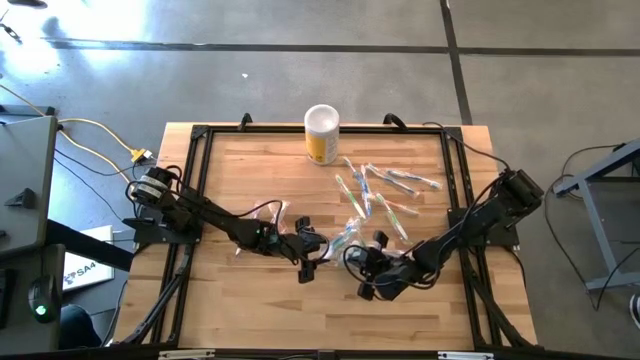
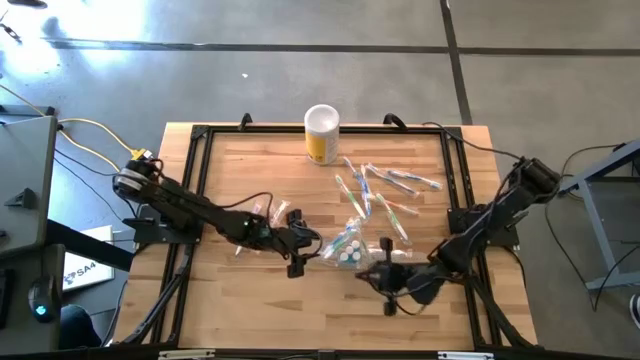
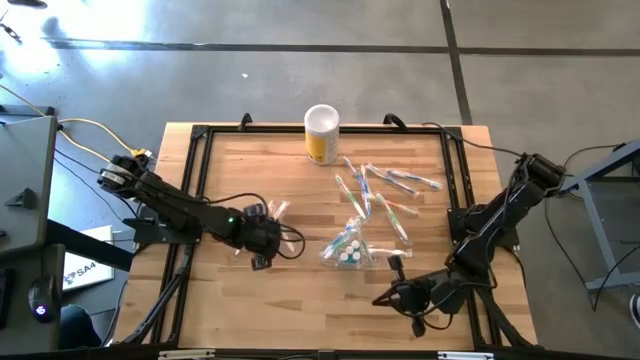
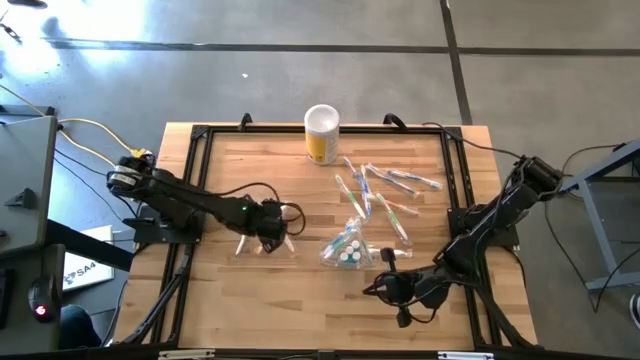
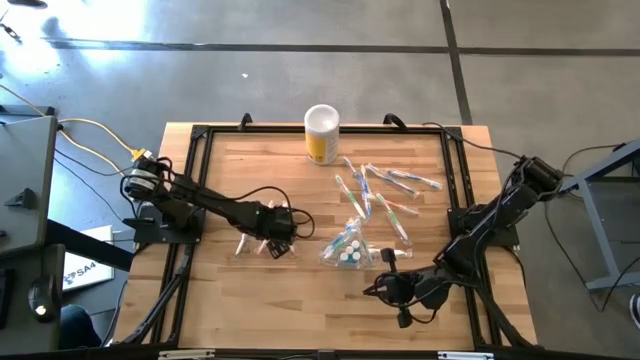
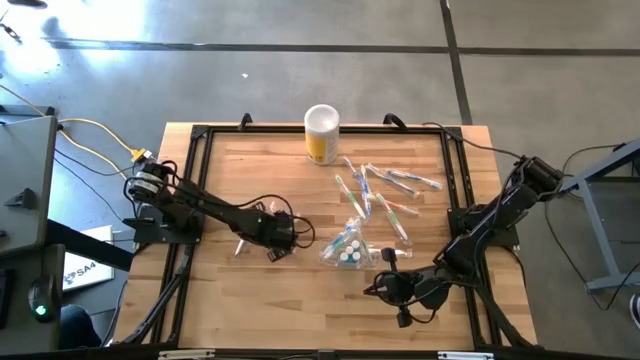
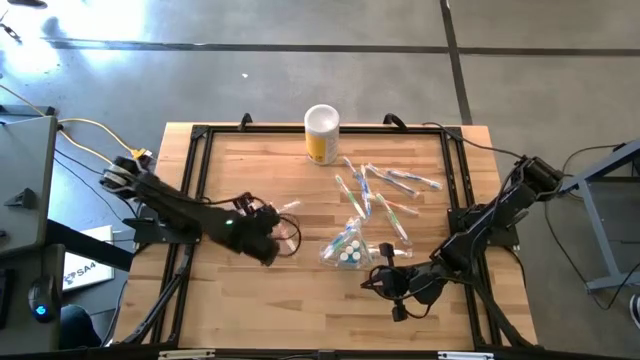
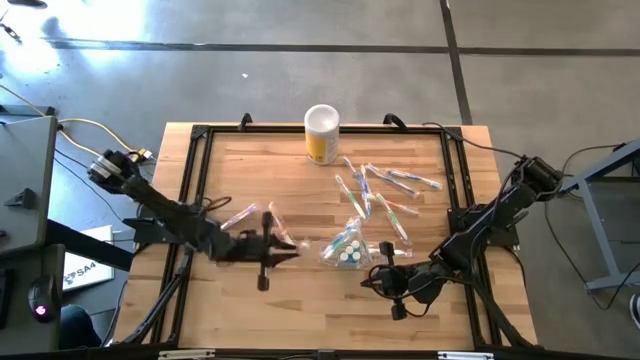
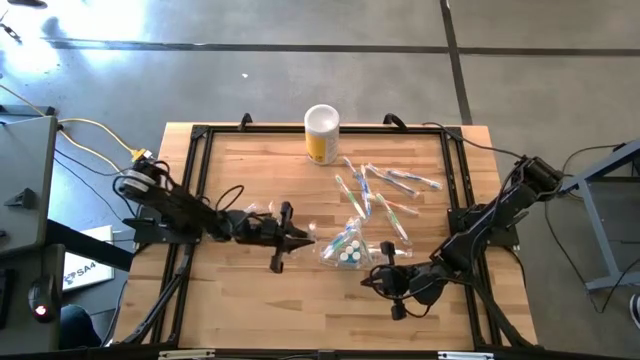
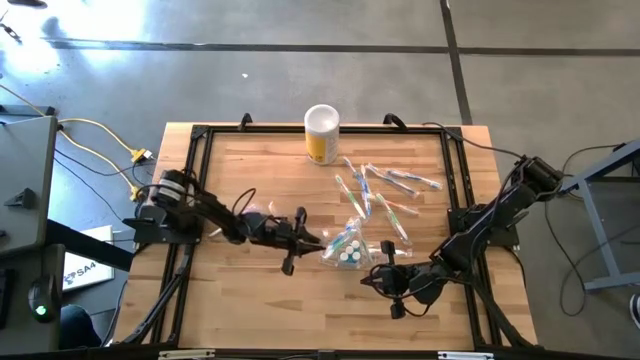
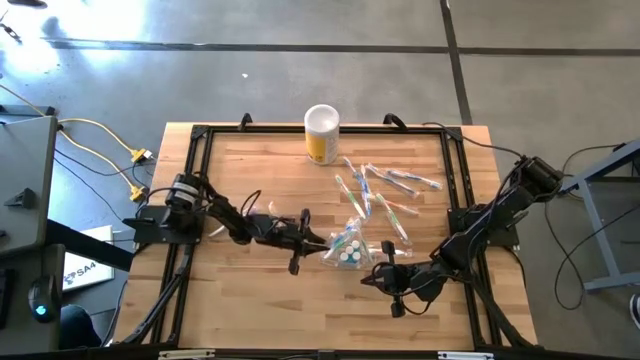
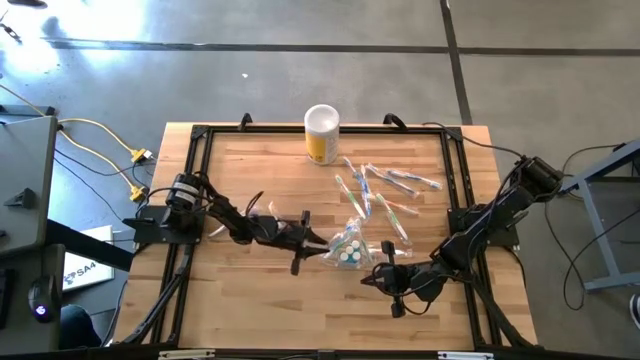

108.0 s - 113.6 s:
Task: Pick & Place toothbrushing station
Put the orange toothbrush in the transparent organizer

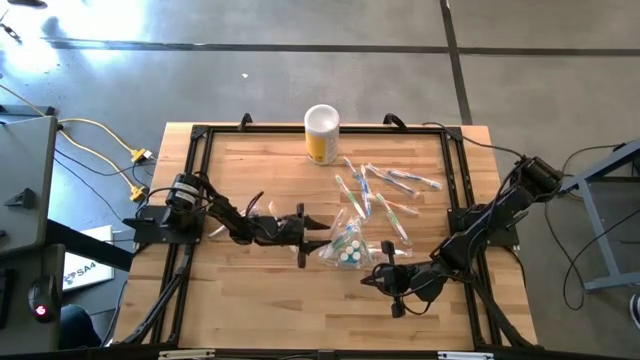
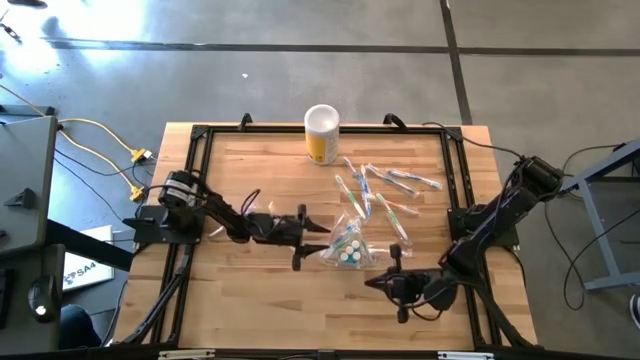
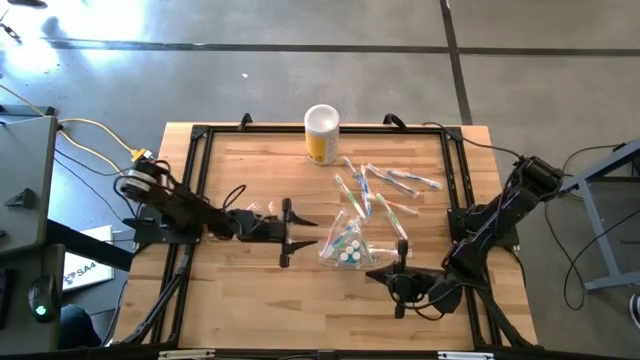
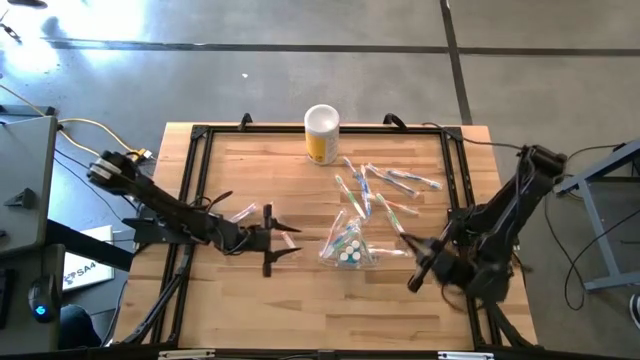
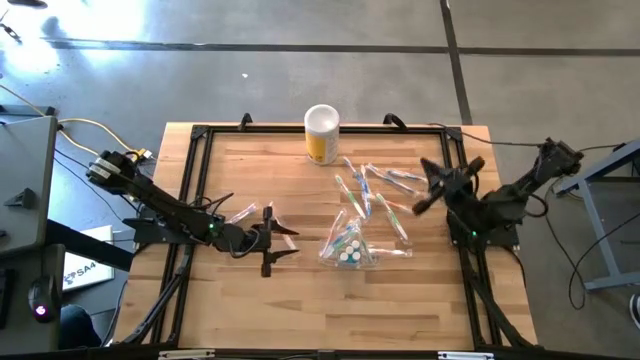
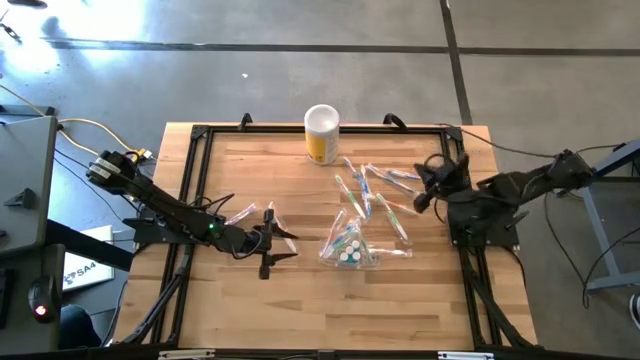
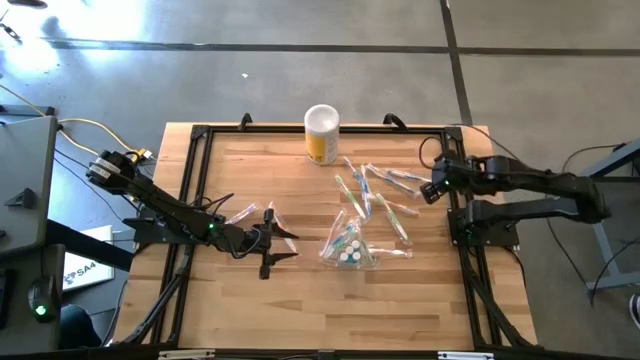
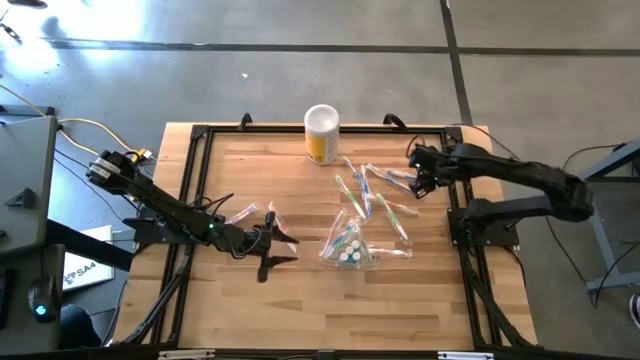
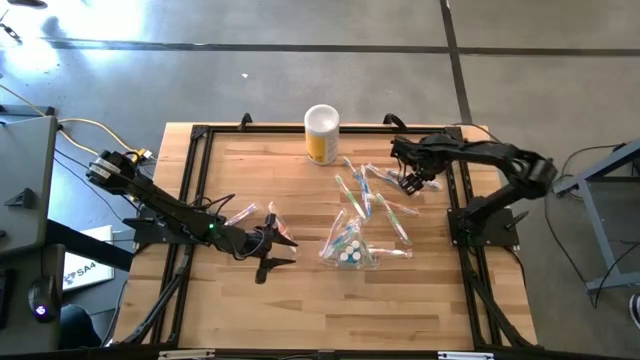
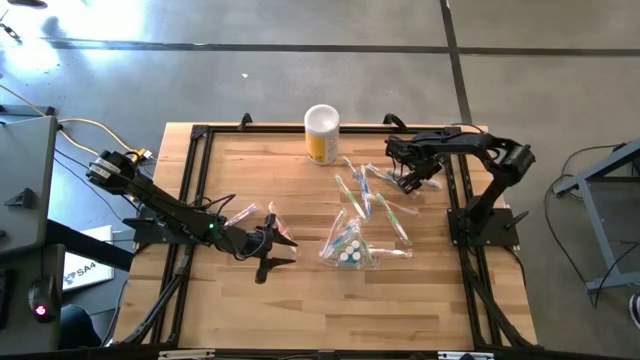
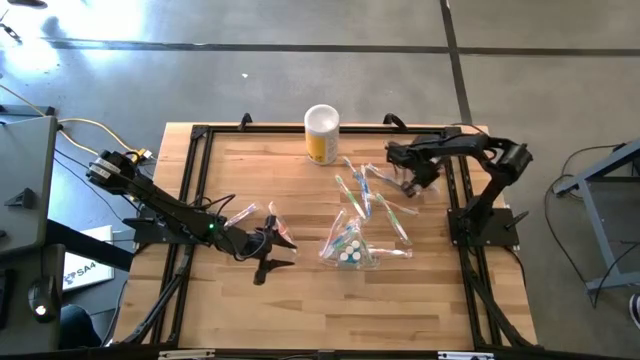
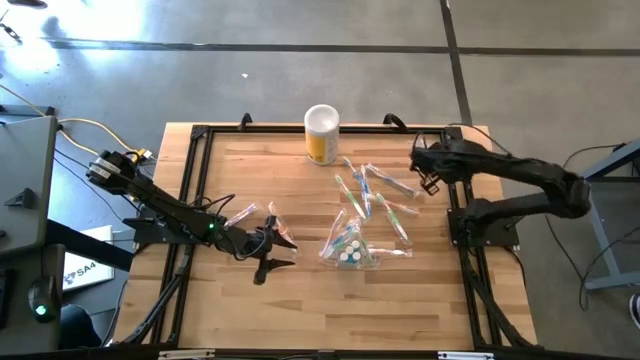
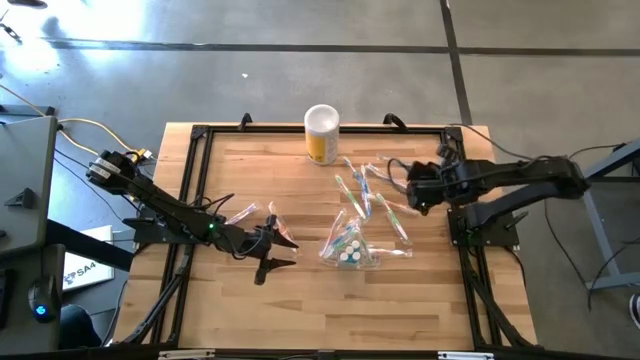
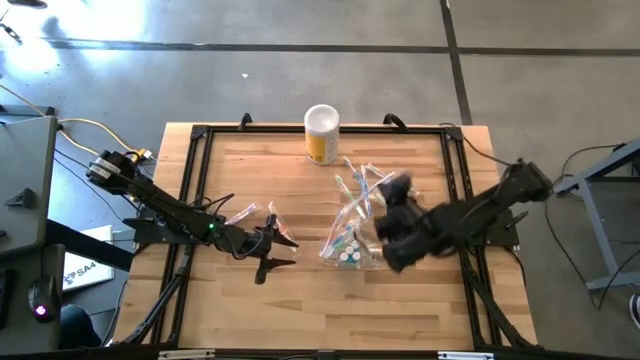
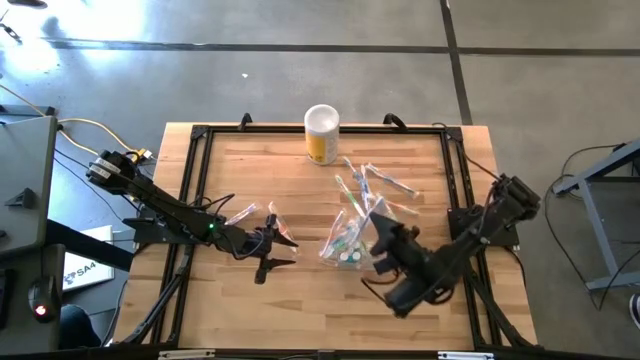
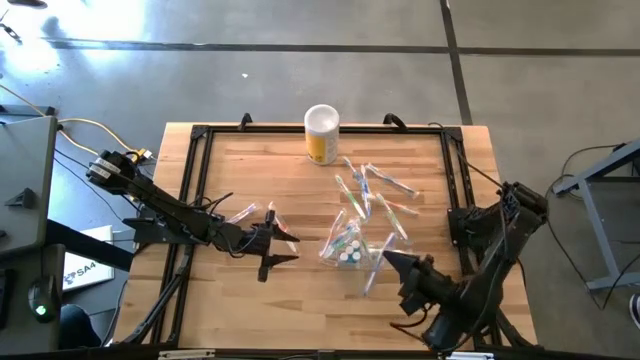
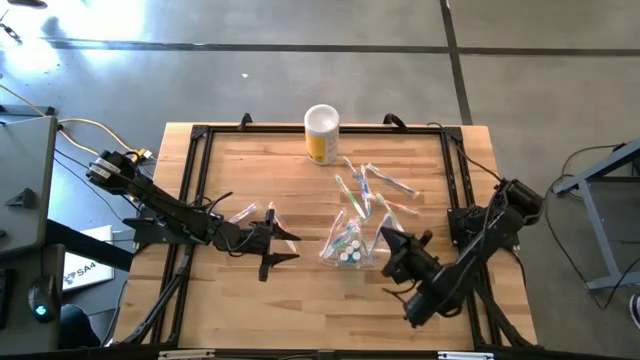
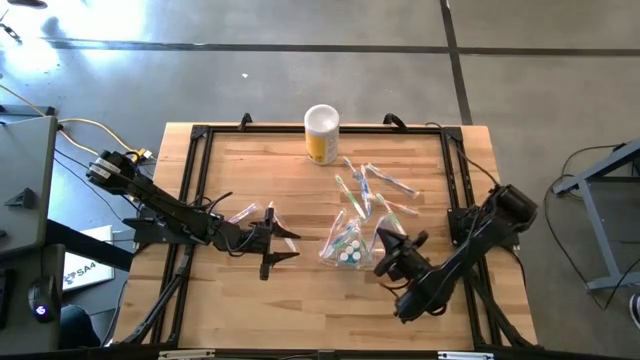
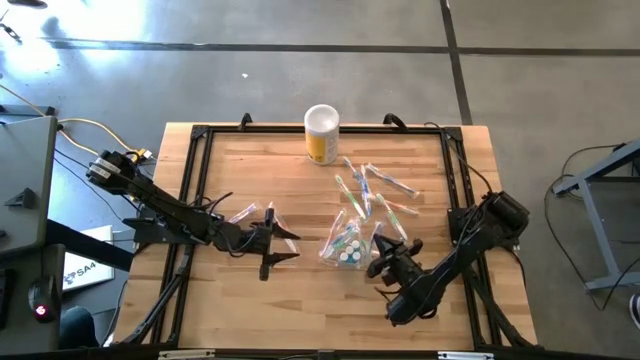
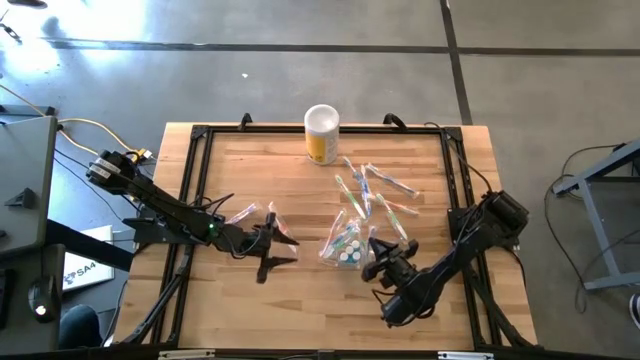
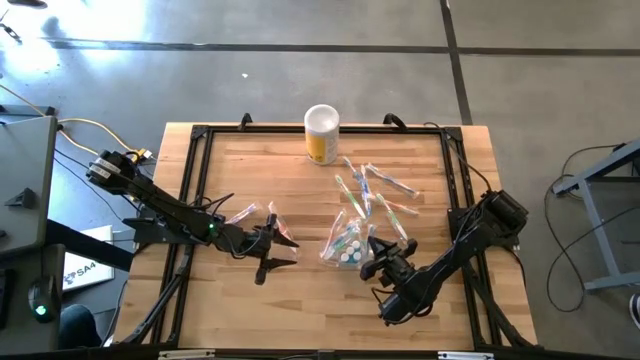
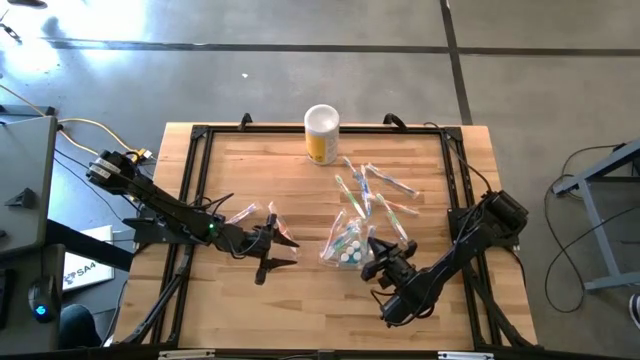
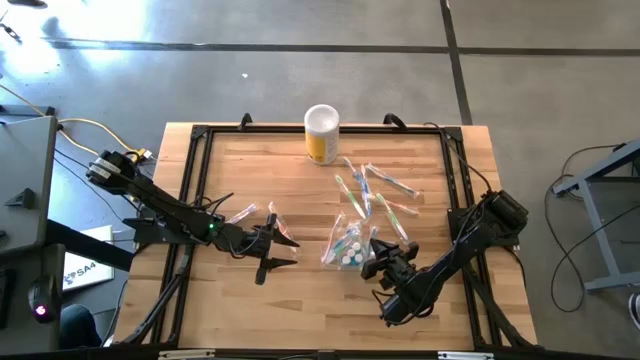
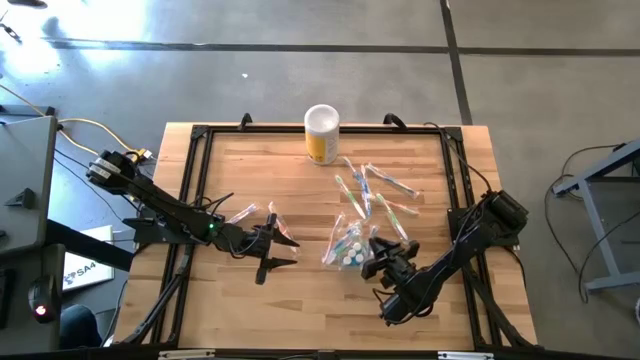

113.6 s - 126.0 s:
Put the blue toothbrush in the transparent organizer

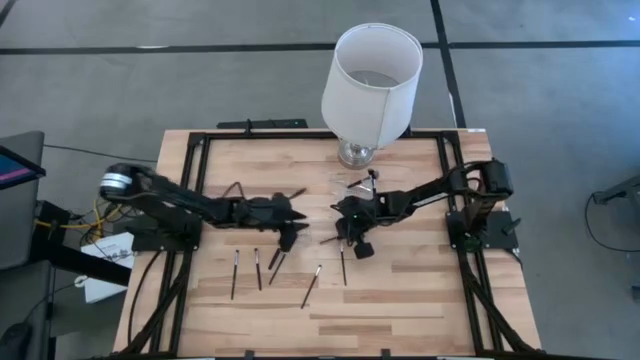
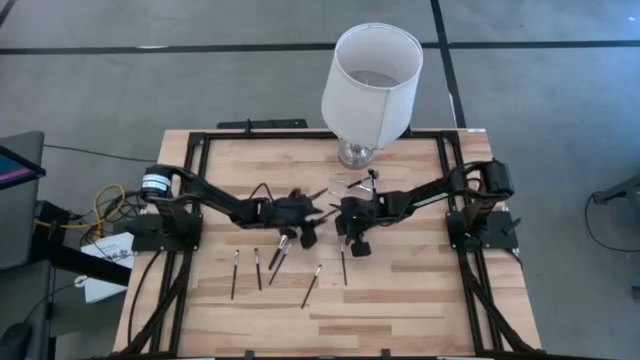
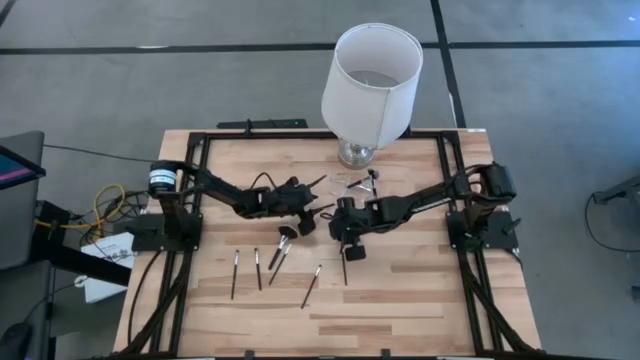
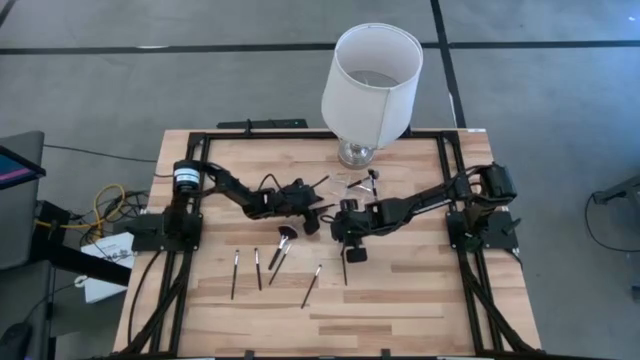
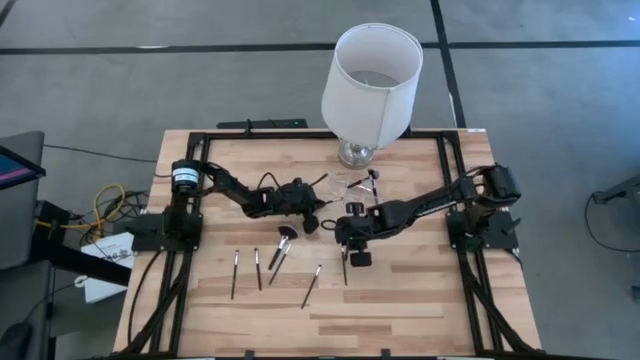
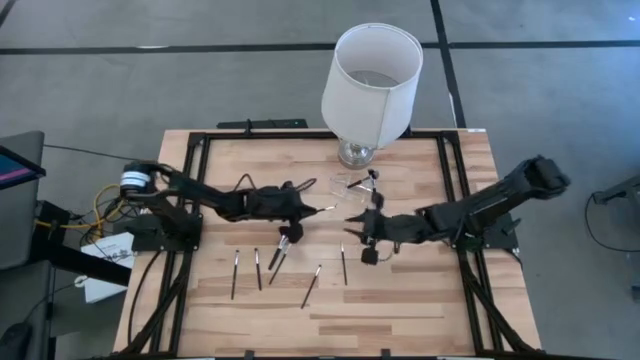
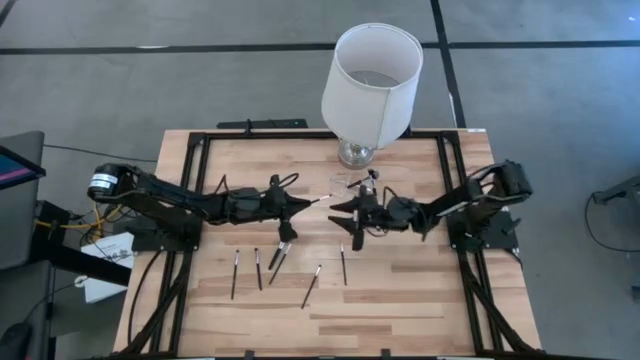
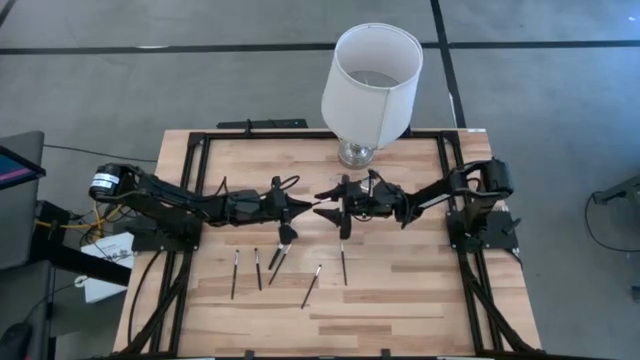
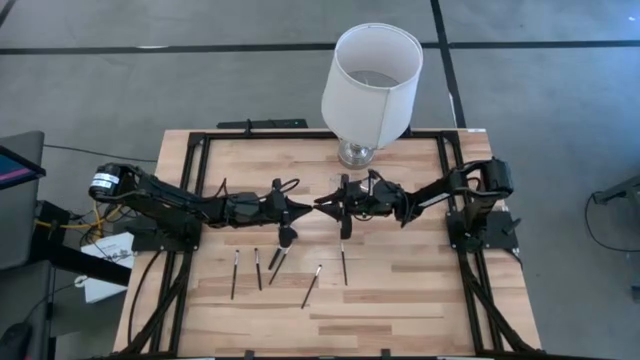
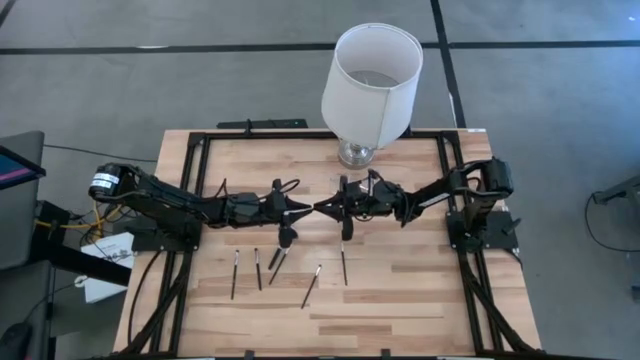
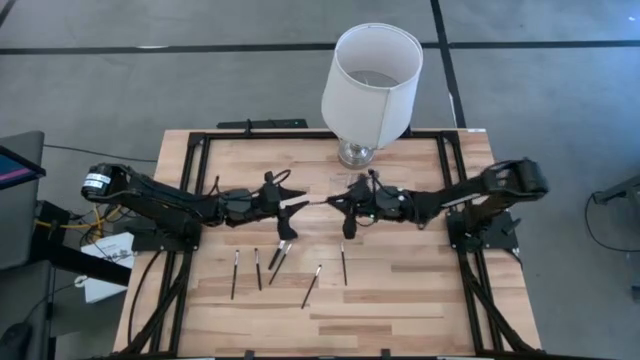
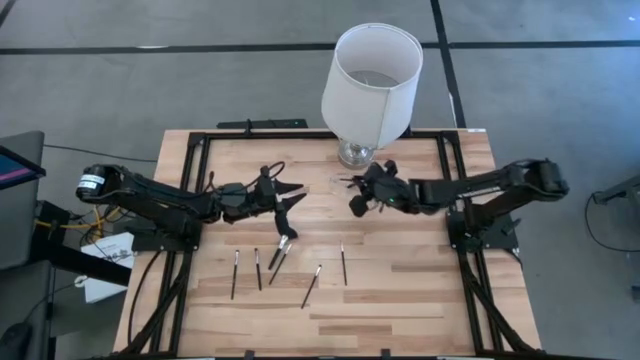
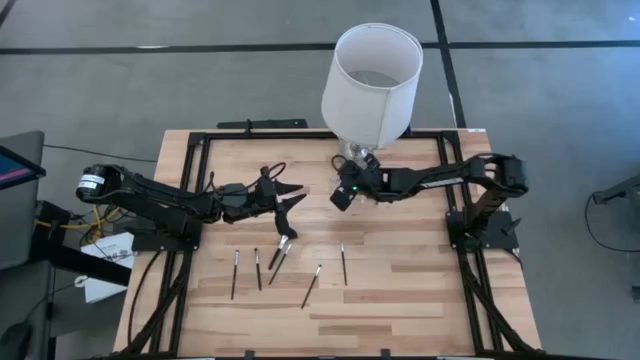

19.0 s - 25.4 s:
Task: Put items in baskets/containers
Put the black eyeshadow brush into the transparent organizer
